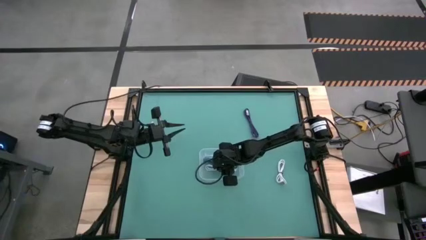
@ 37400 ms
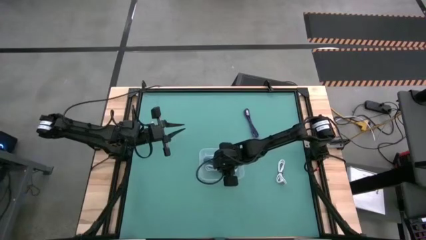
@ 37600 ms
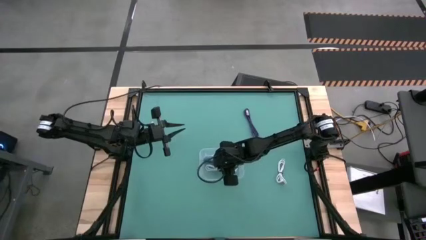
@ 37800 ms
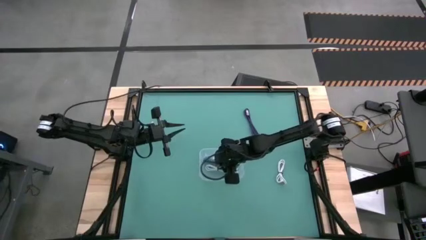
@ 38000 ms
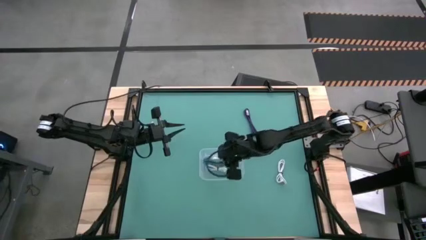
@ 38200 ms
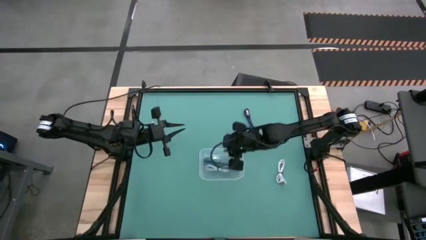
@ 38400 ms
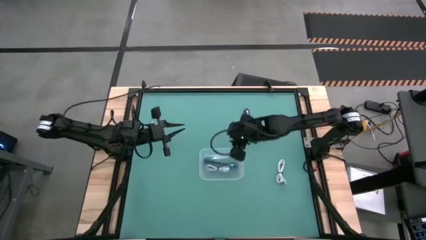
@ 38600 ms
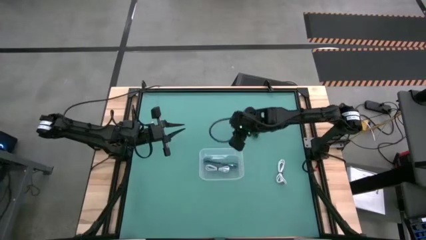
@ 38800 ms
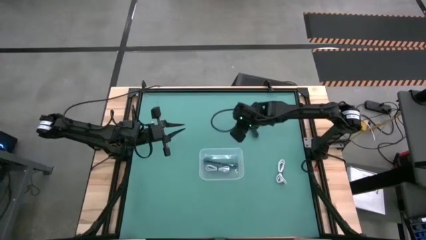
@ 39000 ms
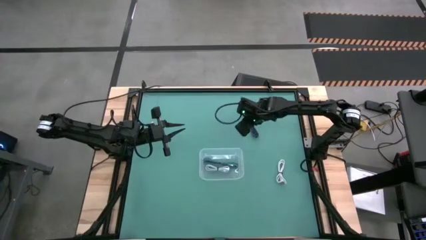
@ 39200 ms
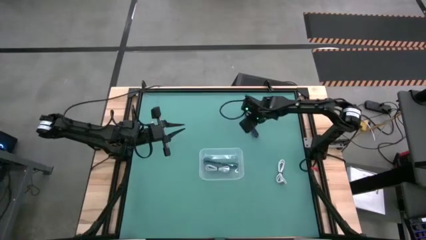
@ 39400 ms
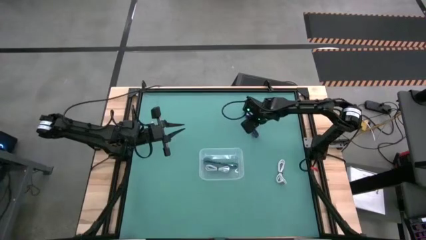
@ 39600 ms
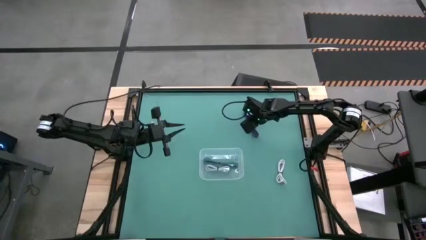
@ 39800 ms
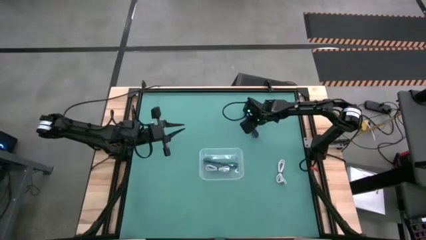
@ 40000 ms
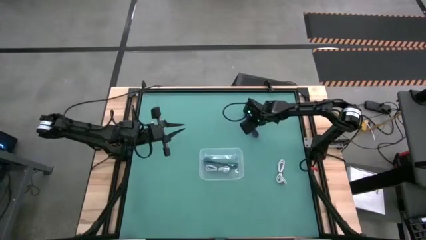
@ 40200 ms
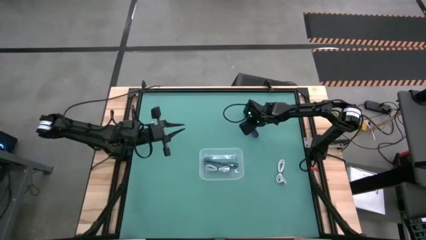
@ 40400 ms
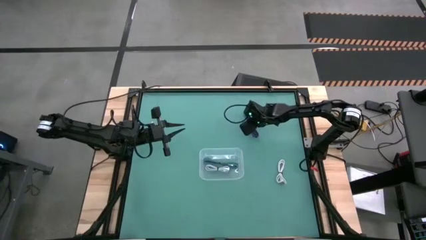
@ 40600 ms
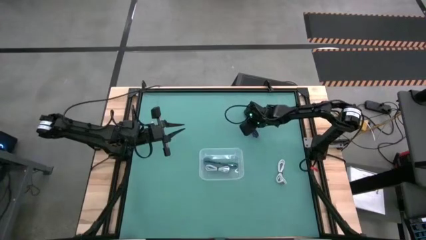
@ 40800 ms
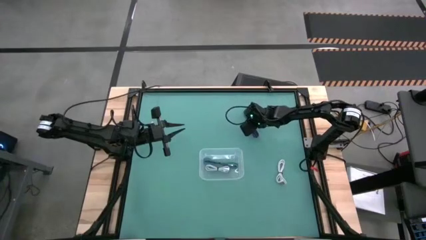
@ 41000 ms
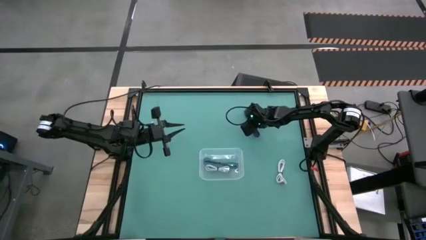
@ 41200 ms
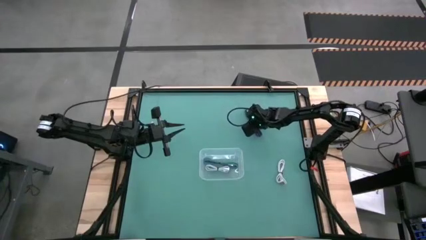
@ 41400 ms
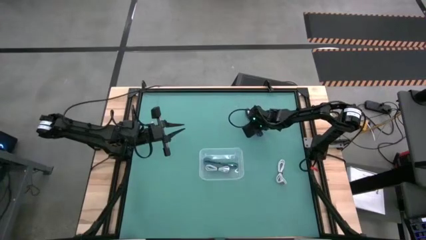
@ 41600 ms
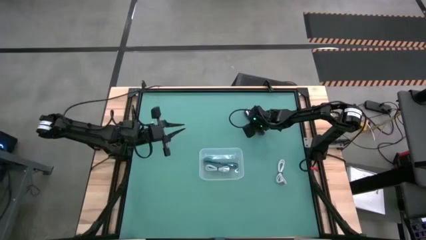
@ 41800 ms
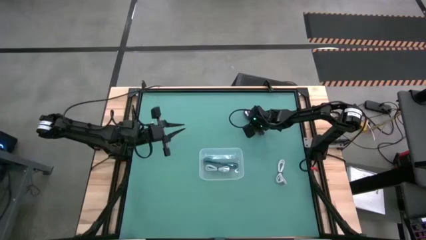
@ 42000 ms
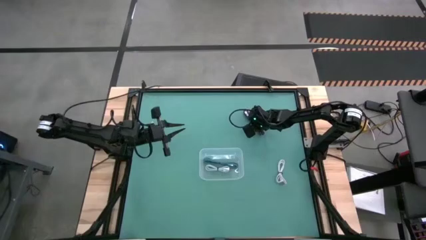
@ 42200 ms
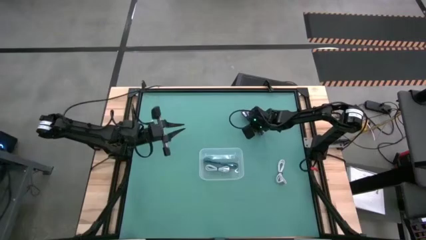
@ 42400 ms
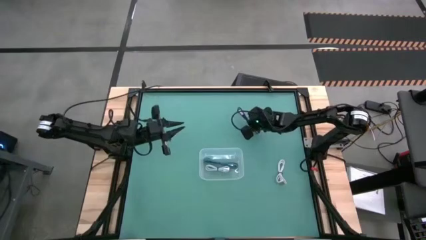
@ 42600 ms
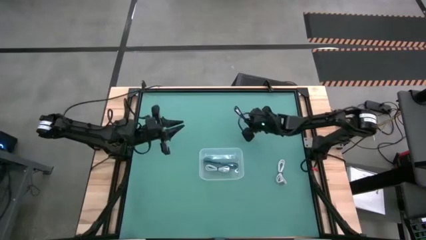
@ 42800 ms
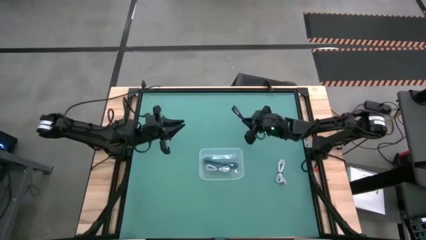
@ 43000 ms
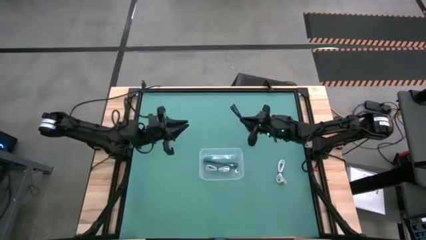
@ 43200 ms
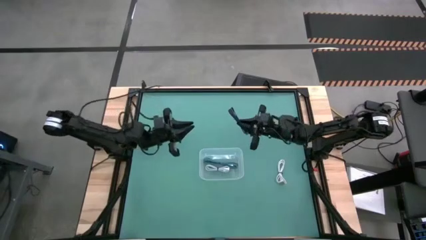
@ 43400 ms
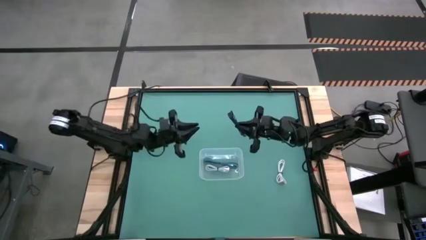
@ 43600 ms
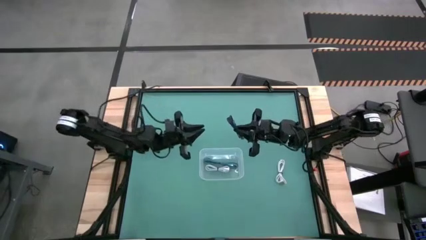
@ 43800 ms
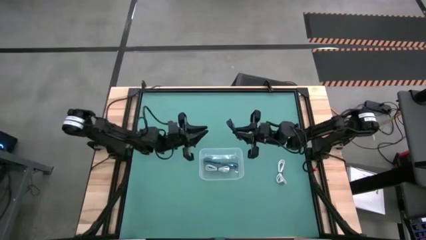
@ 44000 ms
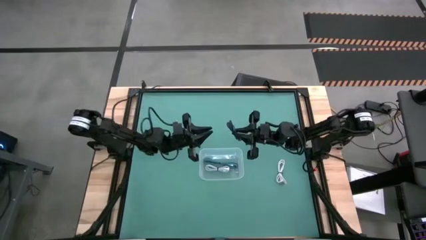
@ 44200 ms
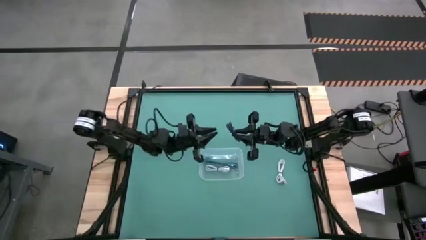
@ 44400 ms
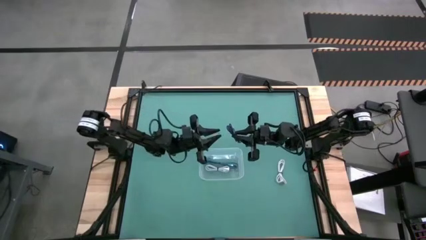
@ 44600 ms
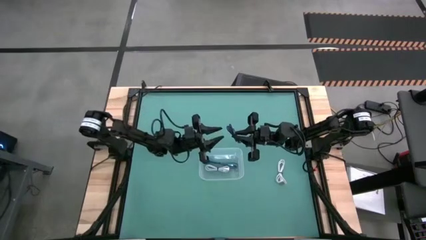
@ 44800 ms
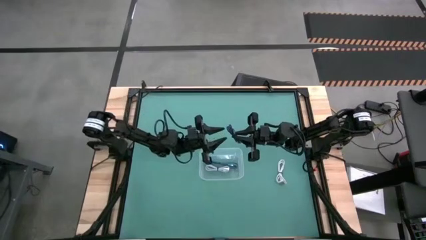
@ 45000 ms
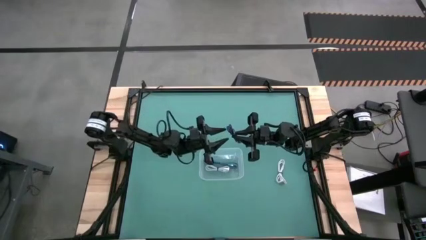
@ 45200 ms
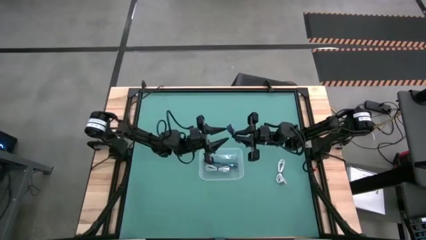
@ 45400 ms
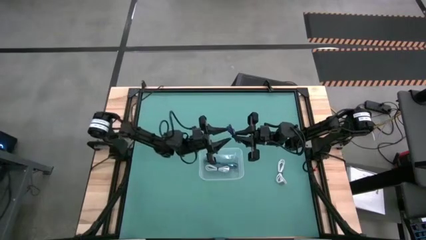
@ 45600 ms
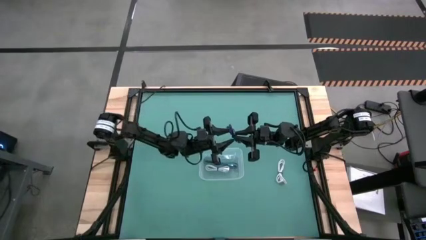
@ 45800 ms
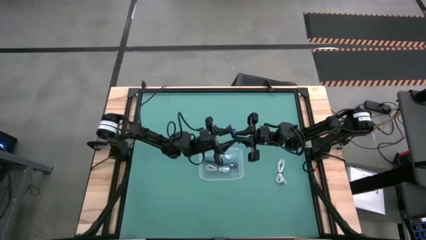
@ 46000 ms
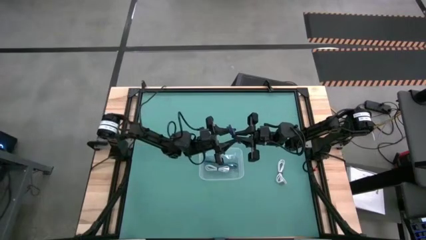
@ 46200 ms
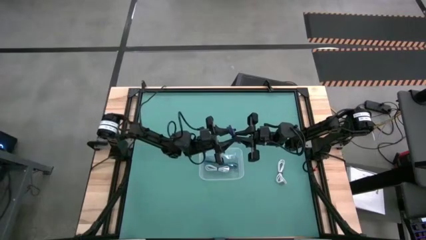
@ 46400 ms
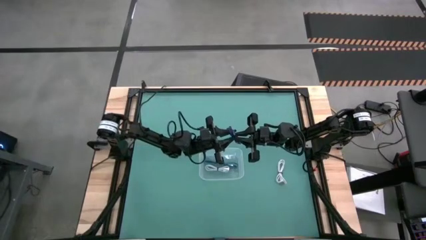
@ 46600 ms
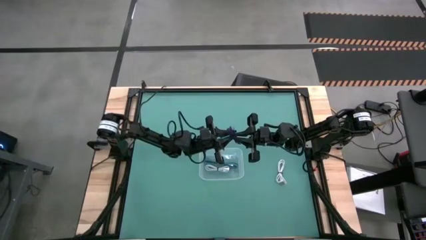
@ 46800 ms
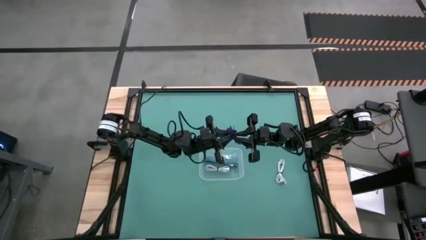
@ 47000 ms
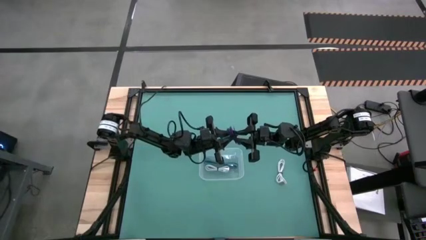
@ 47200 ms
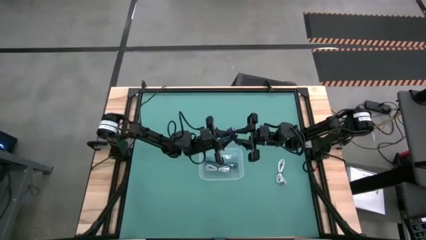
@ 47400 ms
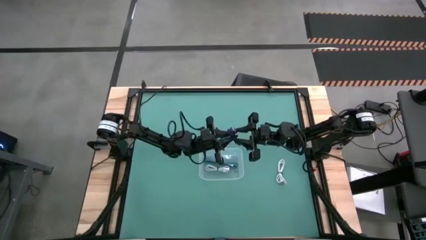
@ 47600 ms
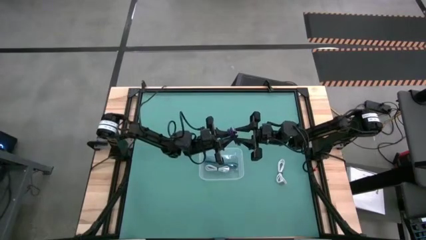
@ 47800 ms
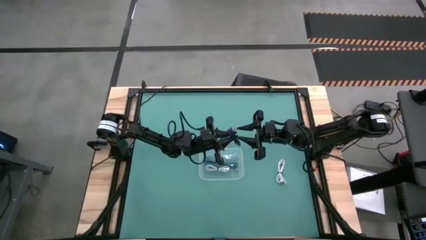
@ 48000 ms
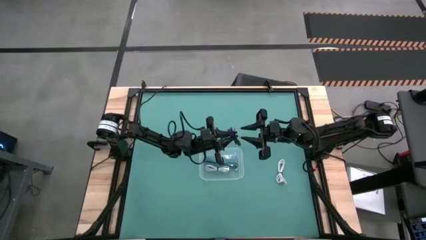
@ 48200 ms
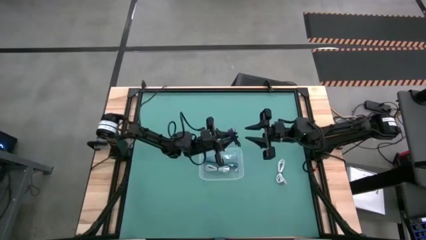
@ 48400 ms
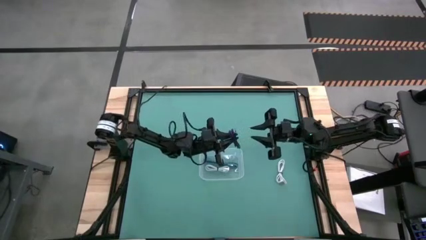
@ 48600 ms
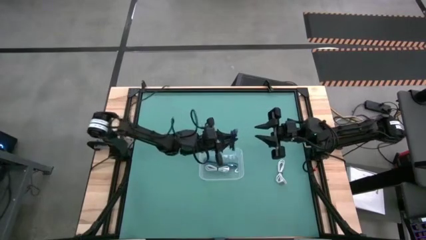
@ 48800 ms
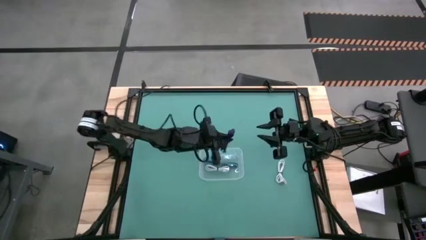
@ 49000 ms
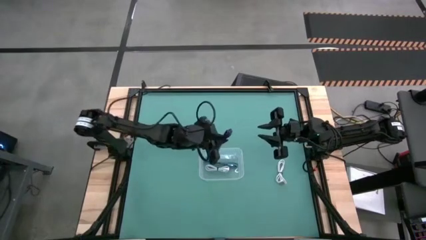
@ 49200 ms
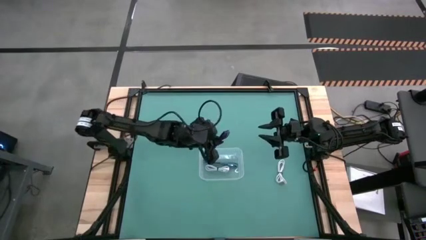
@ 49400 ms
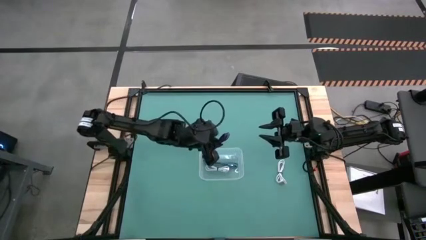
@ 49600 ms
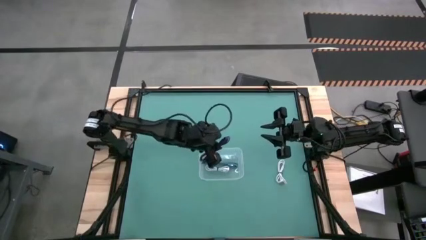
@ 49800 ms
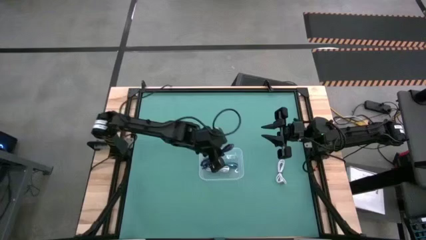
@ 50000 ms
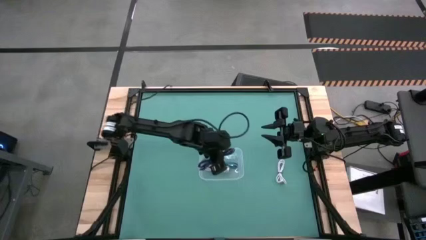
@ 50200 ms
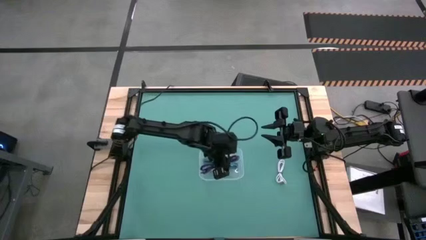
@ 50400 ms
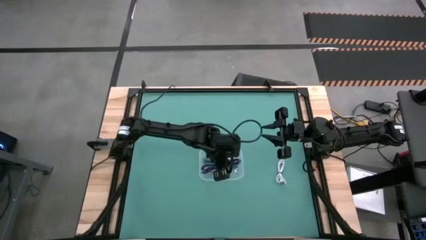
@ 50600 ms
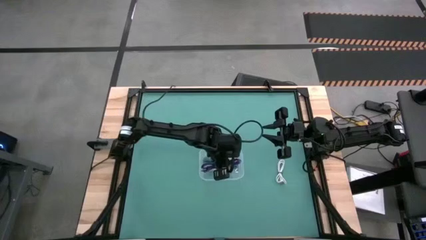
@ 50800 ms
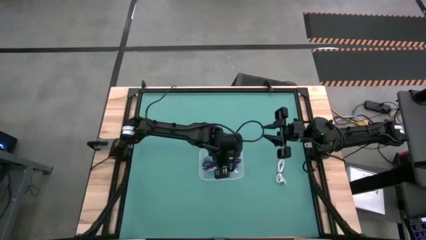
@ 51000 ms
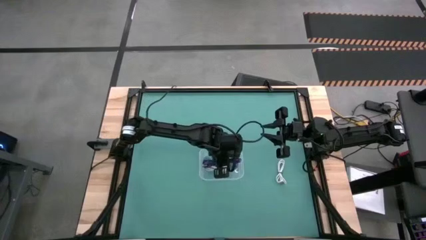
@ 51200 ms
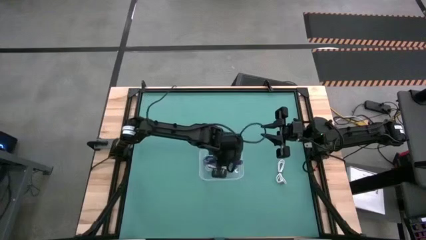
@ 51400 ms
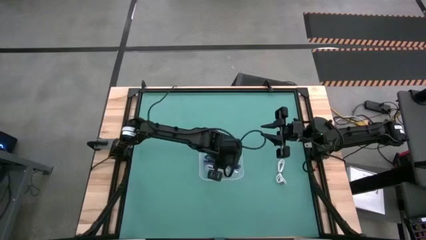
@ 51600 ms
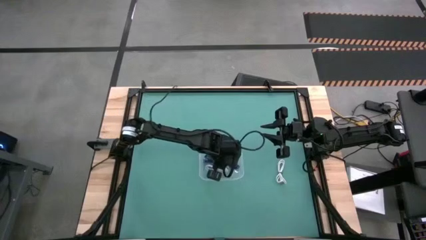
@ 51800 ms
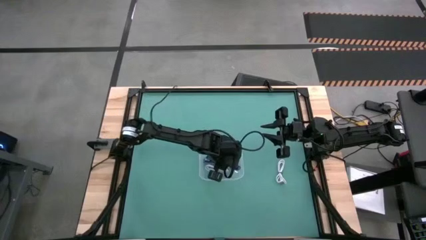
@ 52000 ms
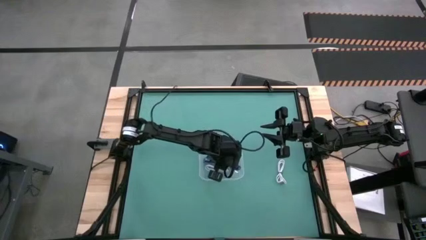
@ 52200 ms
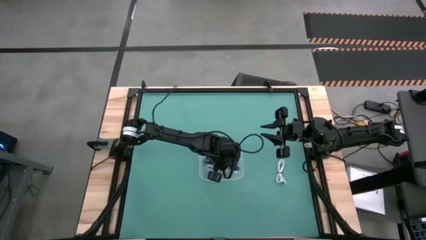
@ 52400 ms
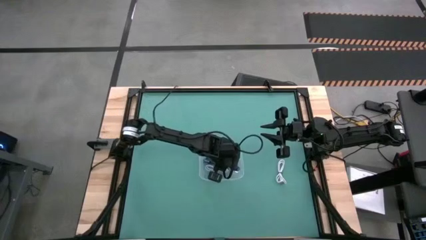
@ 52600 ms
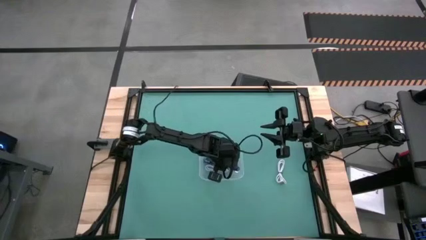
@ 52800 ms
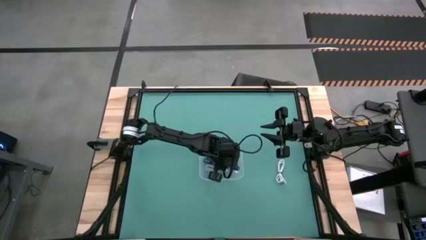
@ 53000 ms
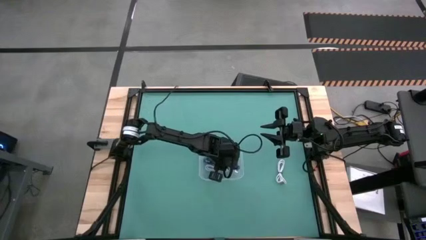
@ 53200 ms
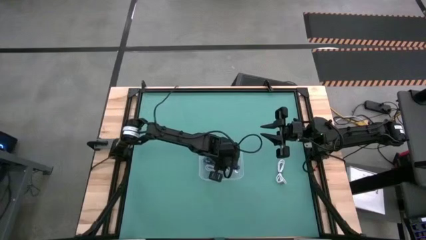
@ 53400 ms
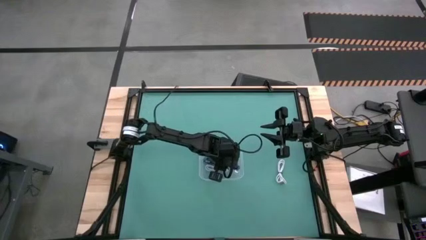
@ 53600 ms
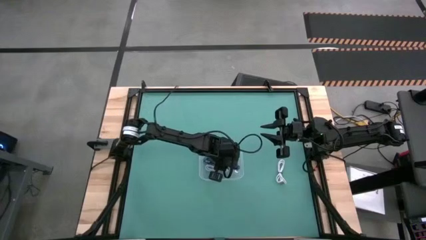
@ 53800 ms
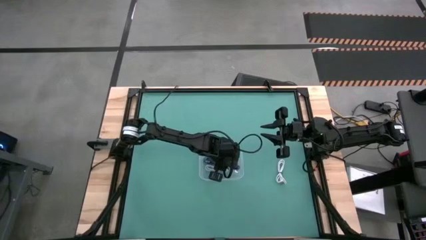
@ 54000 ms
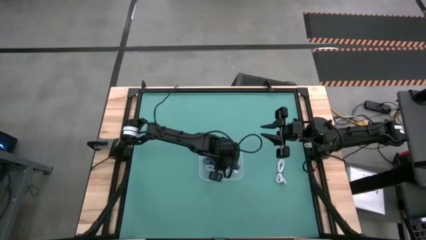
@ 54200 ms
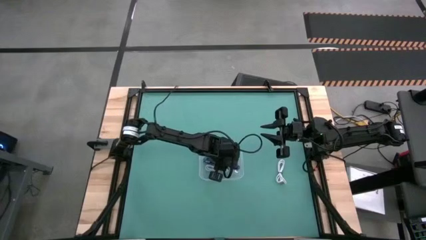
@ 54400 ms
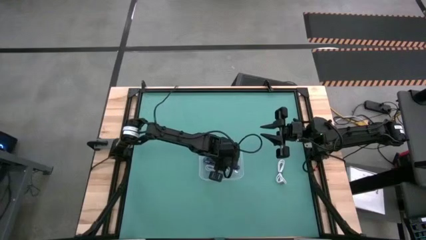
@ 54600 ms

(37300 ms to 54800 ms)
Task: Pick and place USB-C Cables
Put the purple charger cable into the transparent bin
